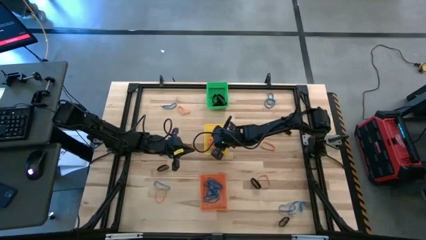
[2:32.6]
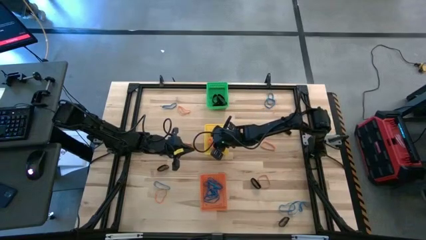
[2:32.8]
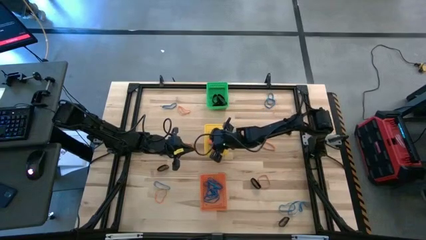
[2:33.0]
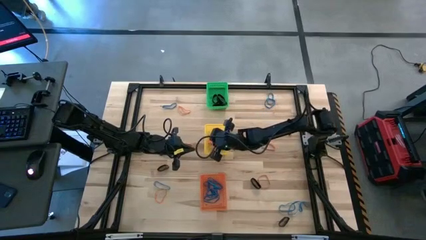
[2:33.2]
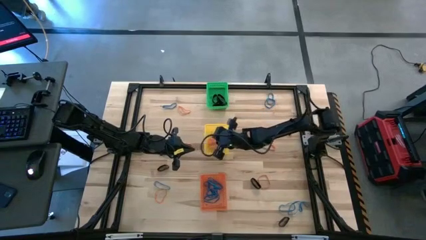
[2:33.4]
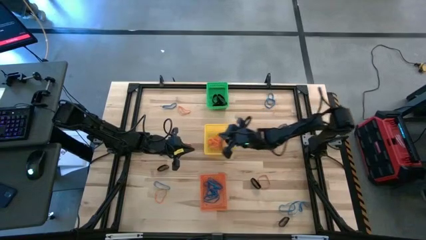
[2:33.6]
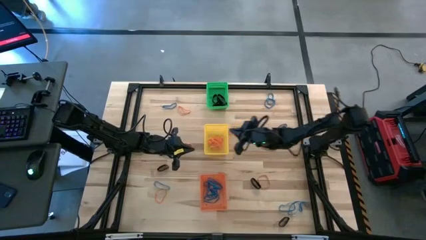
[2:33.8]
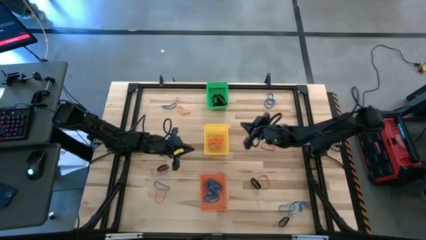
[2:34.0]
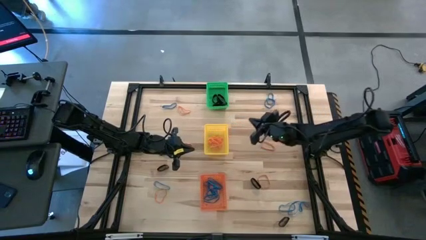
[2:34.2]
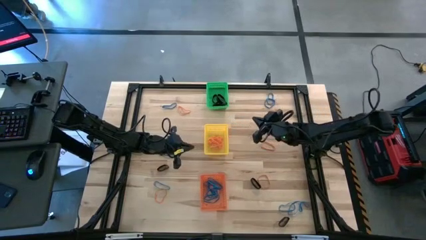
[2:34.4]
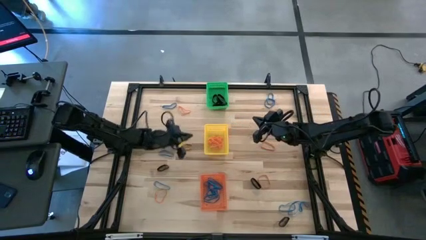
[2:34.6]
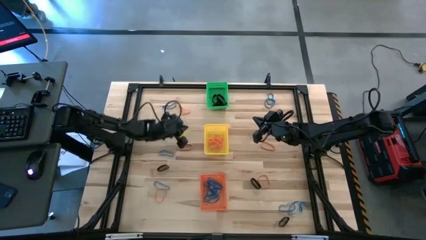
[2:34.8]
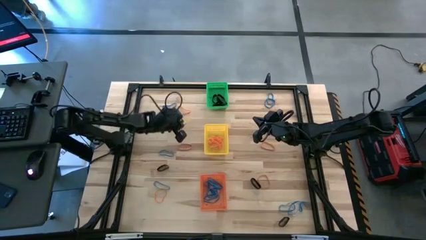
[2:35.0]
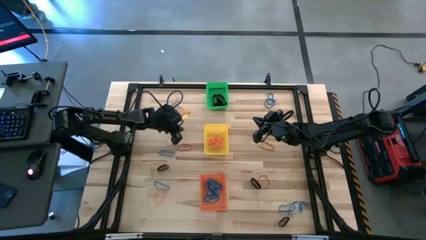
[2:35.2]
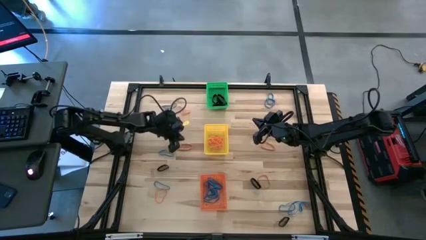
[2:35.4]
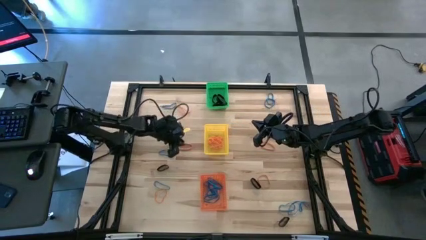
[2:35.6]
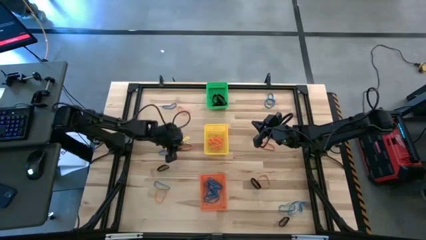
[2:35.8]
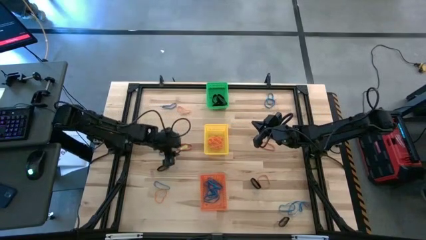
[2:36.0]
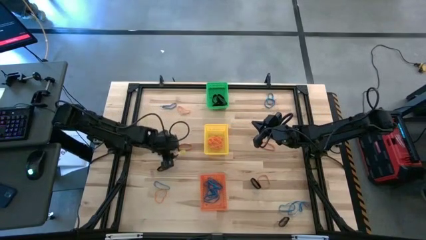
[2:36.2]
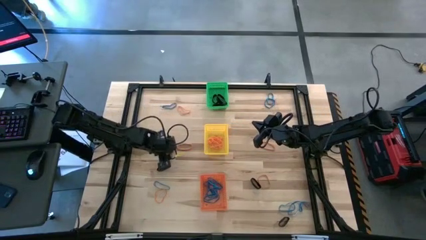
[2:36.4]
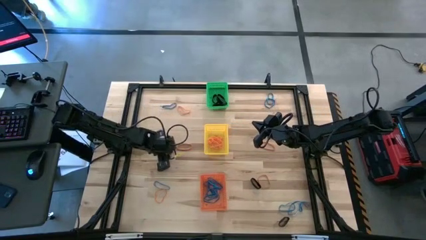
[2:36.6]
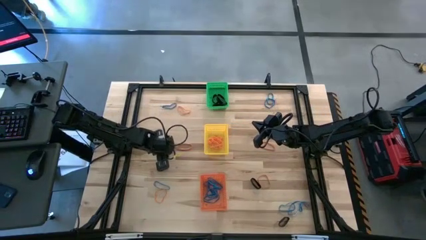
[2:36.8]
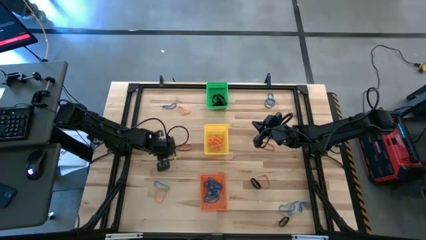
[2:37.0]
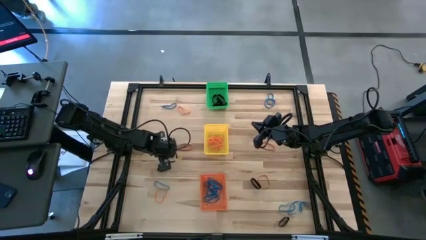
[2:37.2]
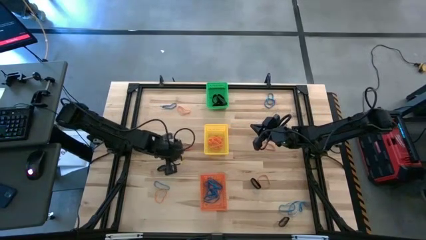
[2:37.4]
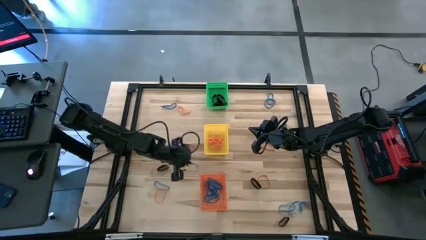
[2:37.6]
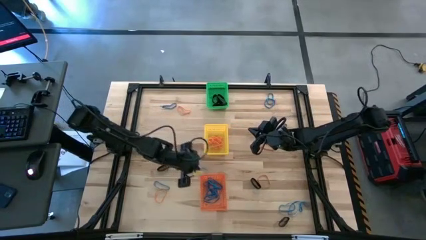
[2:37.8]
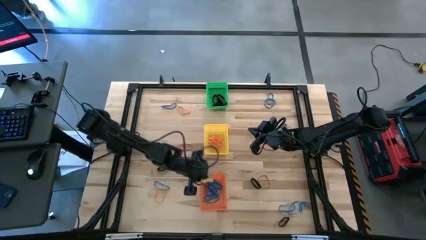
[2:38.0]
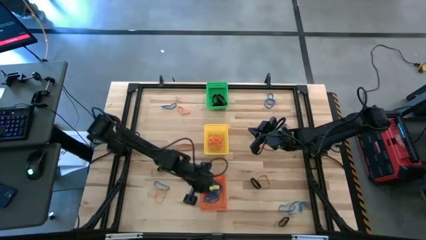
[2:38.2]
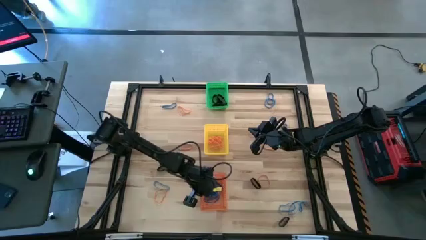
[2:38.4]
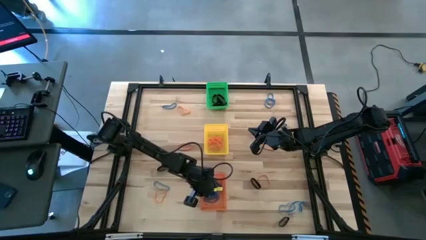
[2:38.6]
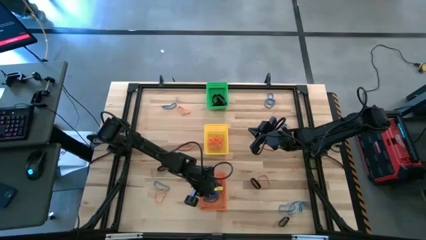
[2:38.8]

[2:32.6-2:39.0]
Task: Sort rubber bands into baskets
Put the blue rubber band into the orange bin

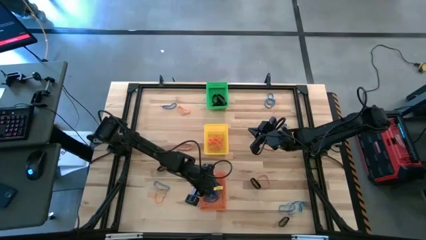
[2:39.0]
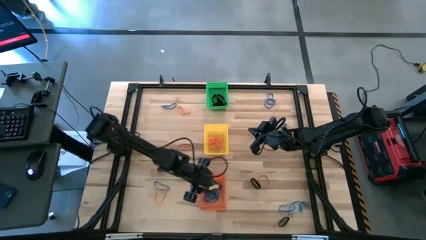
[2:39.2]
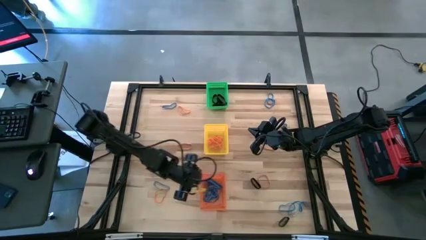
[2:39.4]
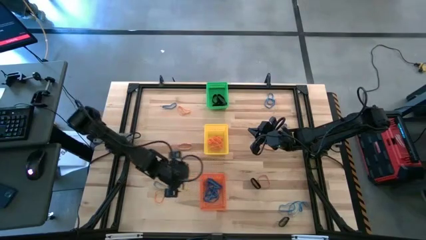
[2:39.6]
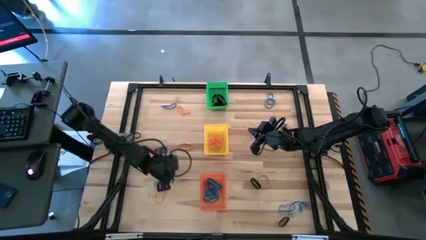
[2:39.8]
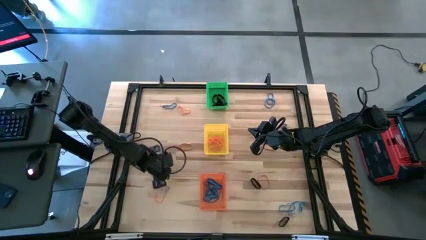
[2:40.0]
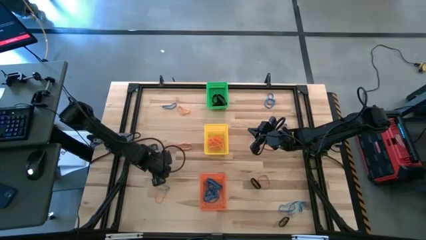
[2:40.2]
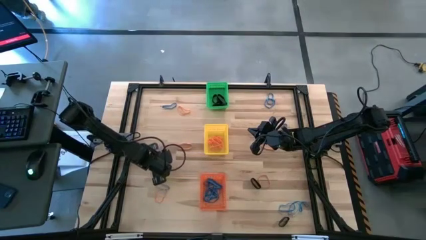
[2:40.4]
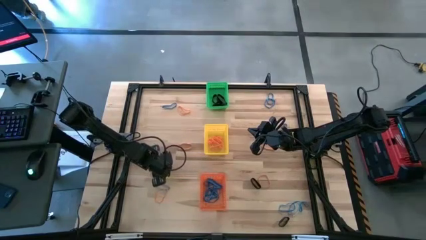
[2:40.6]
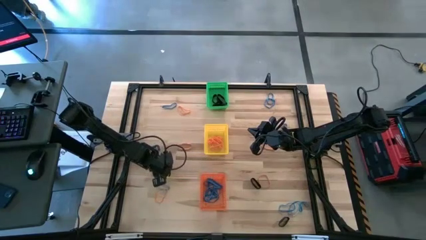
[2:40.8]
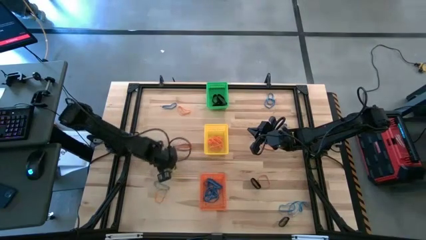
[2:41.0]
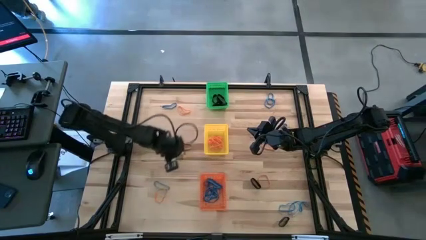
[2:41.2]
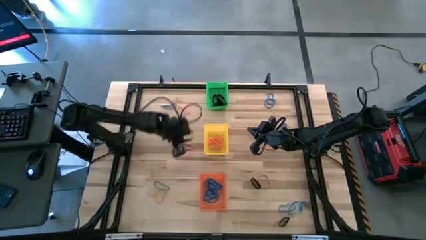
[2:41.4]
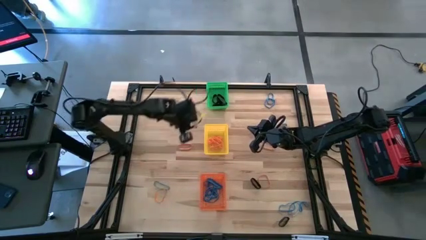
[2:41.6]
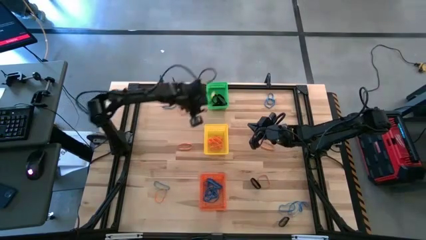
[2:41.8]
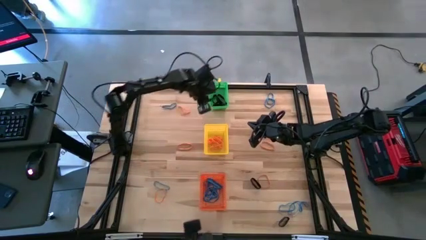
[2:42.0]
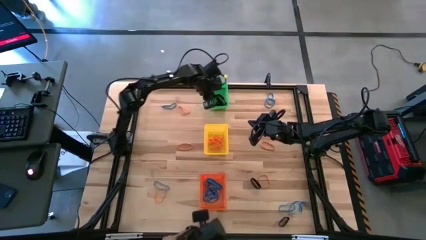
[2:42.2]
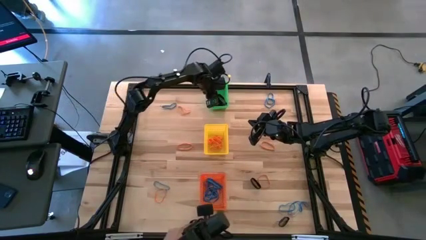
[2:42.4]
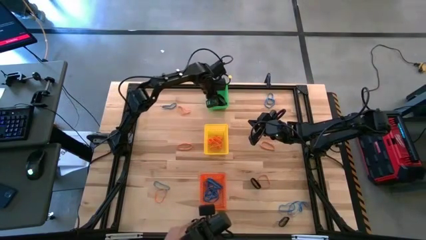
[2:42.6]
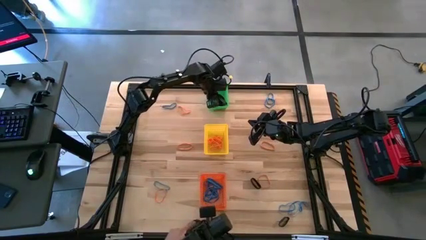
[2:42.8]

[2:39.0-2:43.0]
Put the black rubber band into the green bin

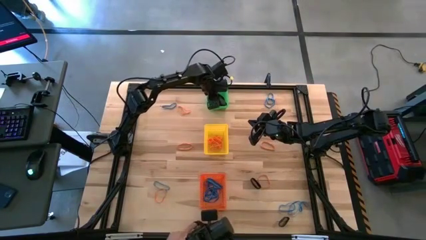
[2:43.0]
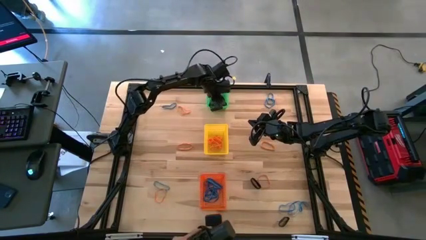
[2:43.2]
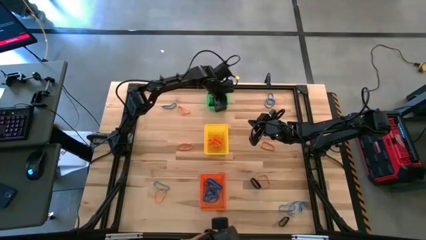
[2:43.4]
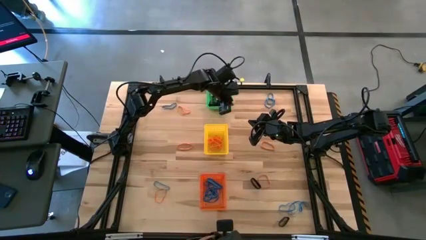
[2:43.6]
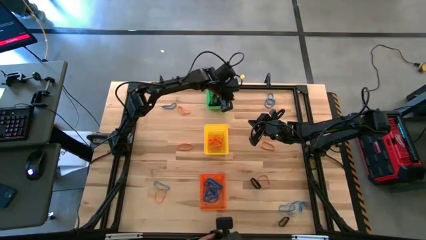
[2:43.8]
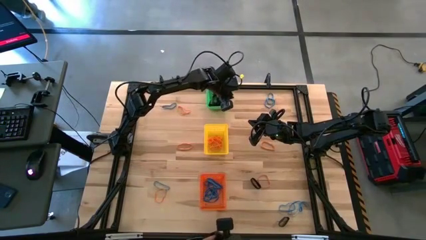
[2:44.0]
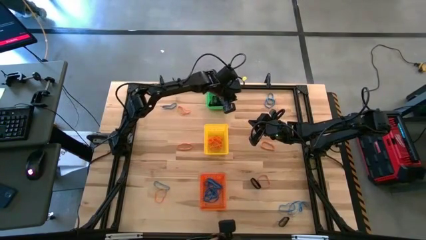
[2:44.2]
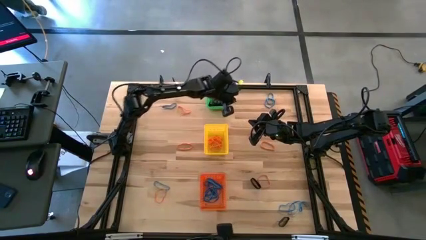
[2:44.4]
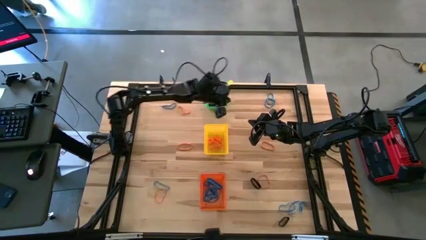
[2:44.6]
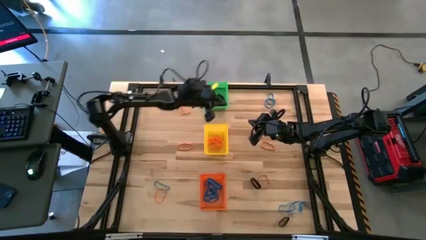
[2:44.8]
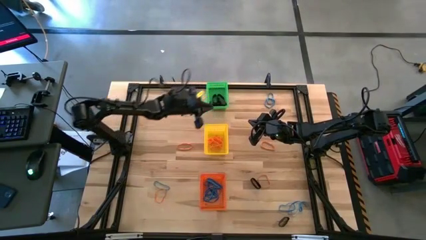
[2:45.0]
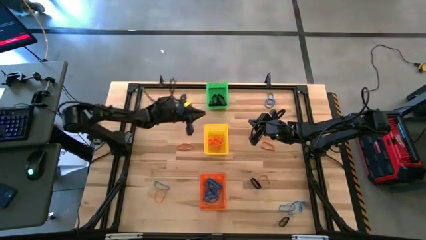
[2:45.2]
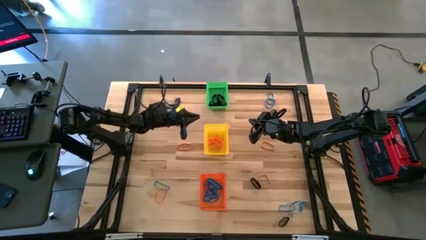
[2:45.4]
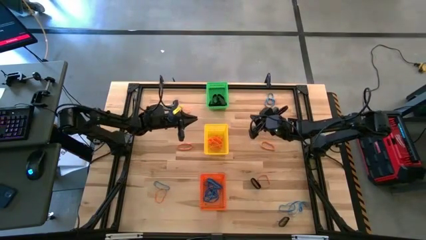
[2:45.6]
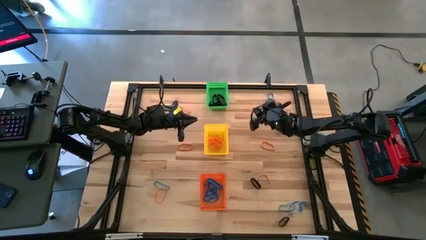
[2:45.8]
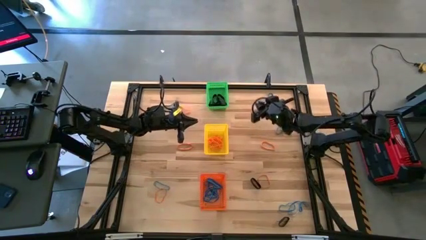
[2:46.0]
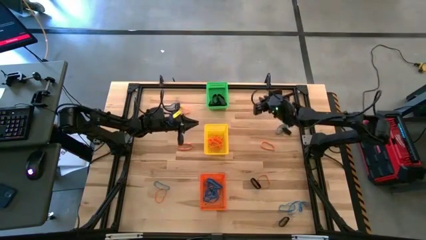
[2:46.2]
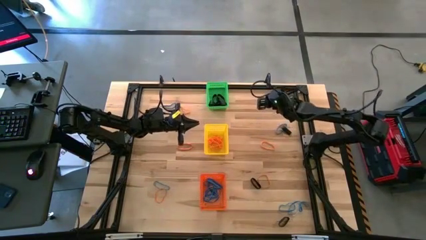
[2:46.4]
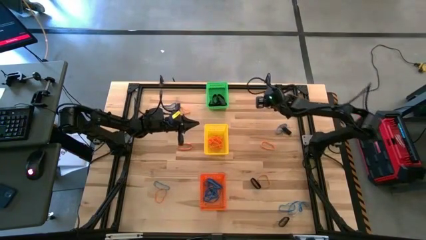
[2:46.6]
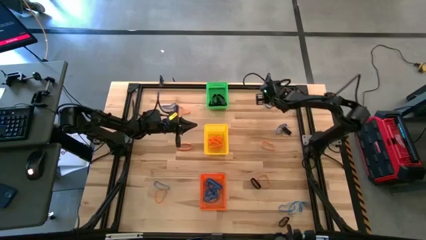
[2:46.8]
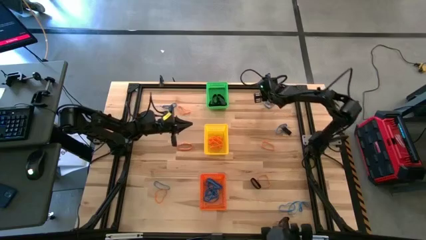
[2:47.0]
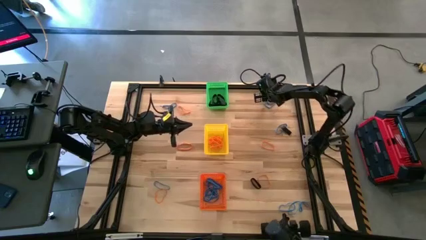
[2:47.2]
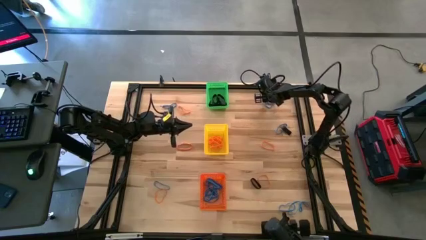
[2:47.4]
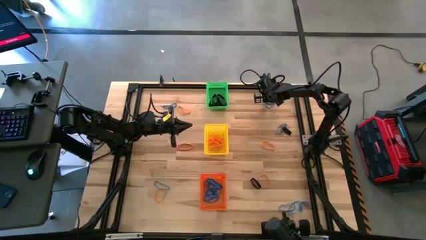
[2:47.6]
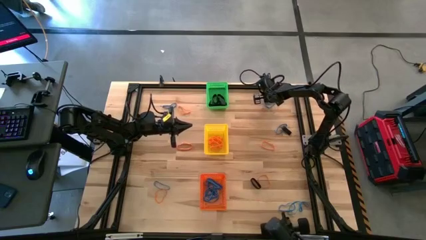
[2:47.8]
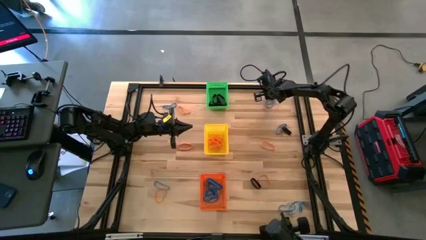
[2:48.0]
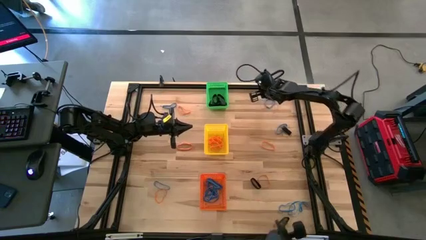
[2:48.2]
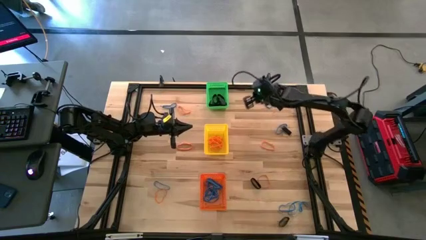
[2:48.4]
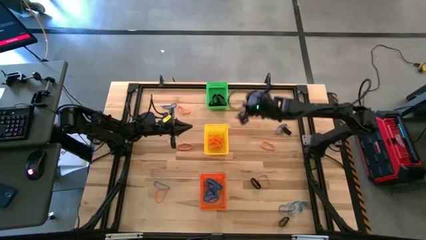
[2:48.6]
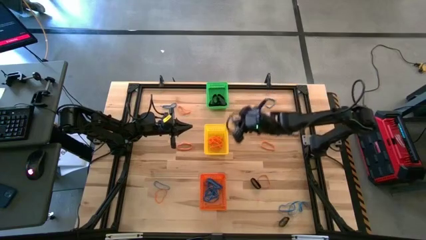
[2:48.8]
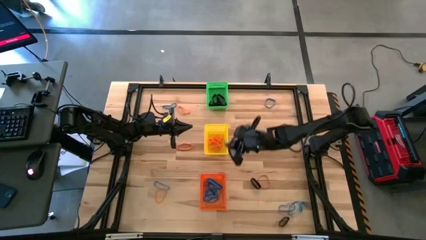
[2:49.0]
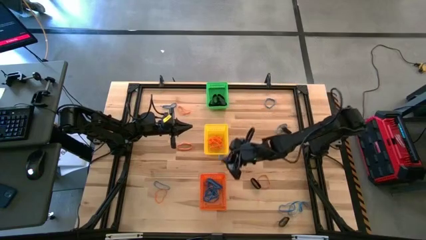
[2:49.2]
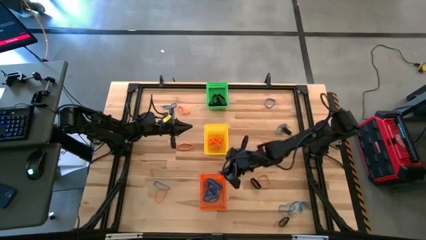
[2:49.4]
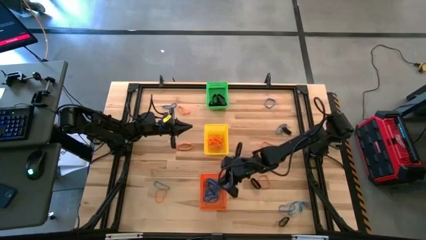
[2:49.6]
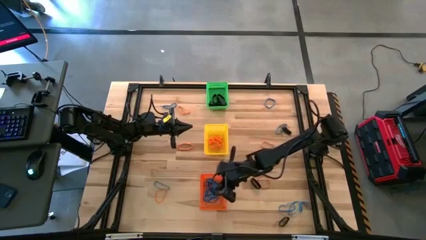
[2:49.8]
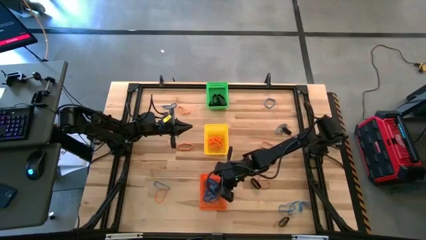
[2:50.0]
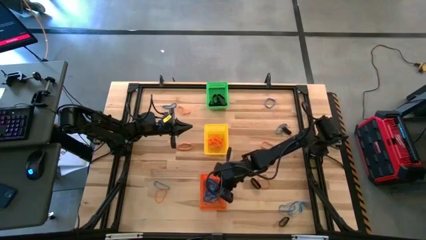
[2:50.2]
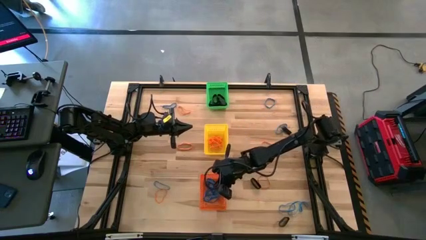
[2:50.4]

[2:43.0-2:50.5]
Put the blue rubber band into the orange bin
